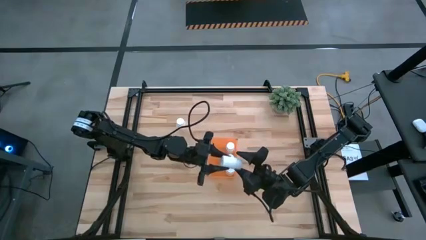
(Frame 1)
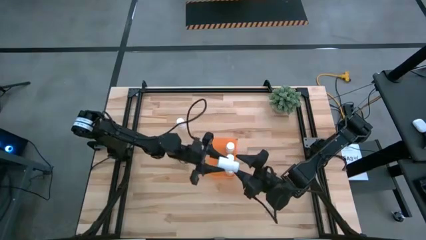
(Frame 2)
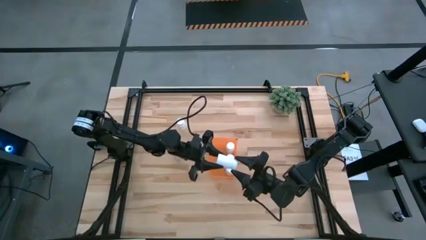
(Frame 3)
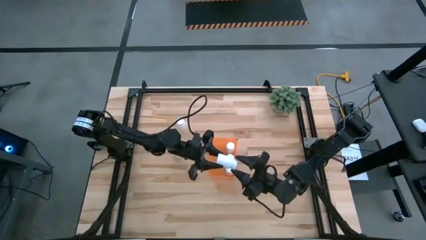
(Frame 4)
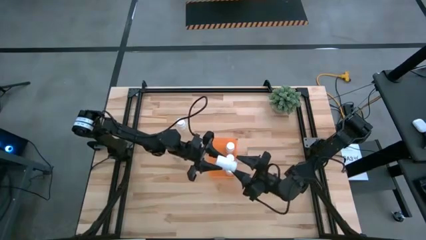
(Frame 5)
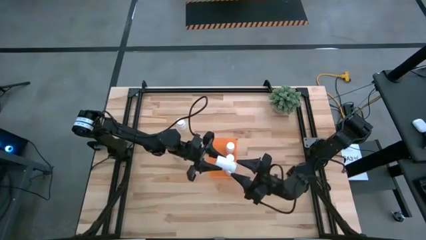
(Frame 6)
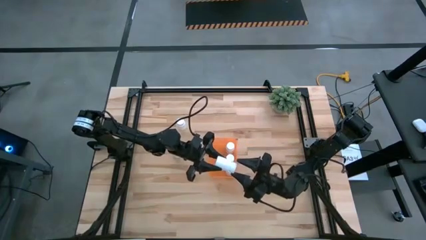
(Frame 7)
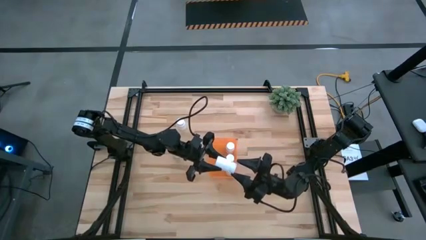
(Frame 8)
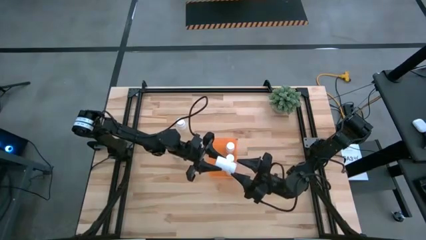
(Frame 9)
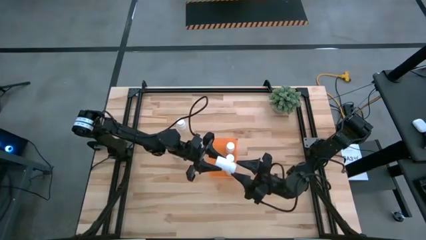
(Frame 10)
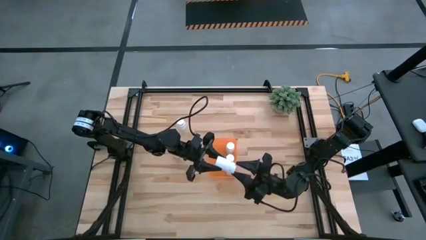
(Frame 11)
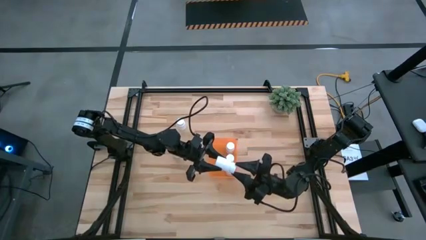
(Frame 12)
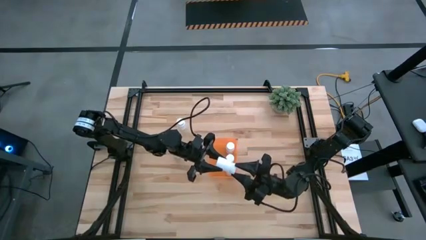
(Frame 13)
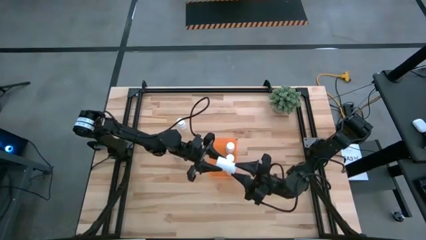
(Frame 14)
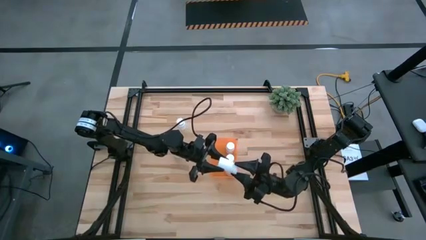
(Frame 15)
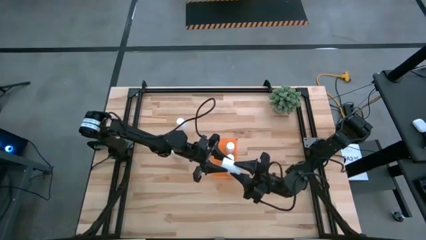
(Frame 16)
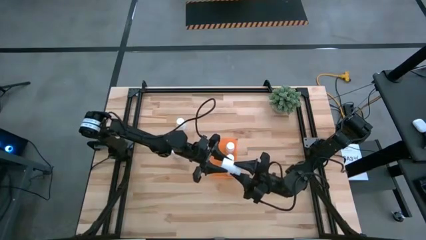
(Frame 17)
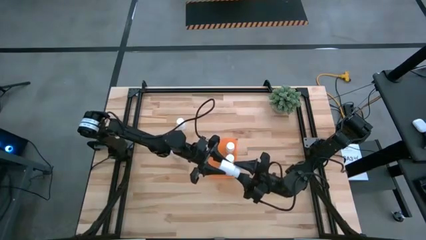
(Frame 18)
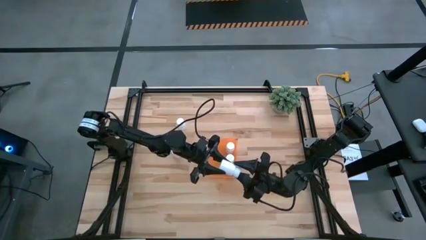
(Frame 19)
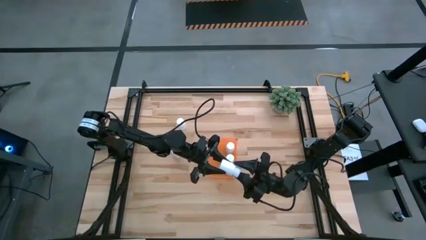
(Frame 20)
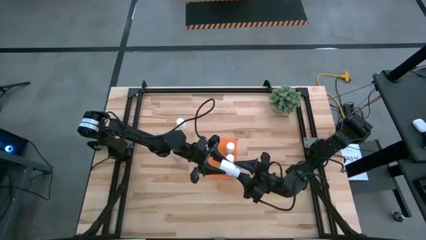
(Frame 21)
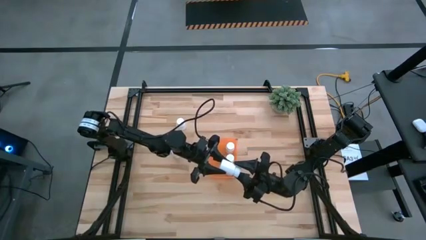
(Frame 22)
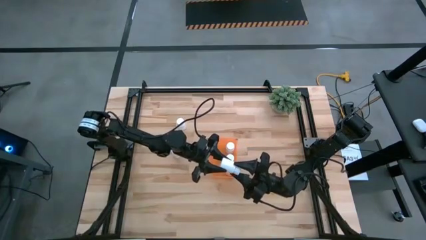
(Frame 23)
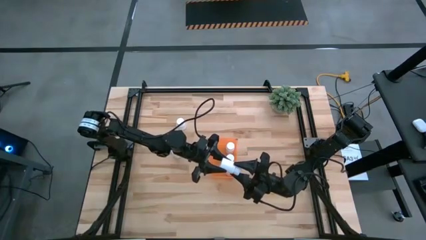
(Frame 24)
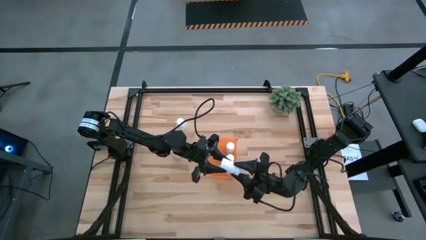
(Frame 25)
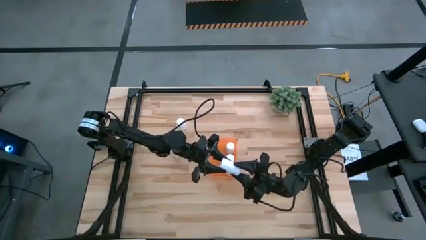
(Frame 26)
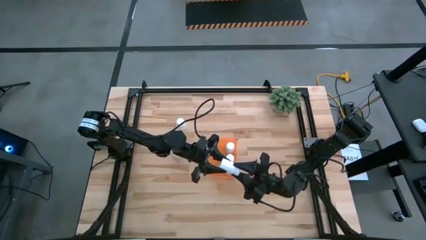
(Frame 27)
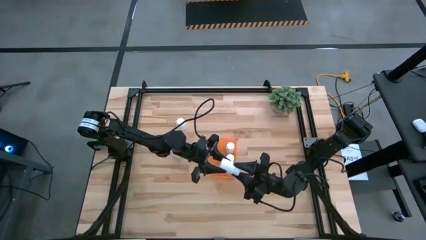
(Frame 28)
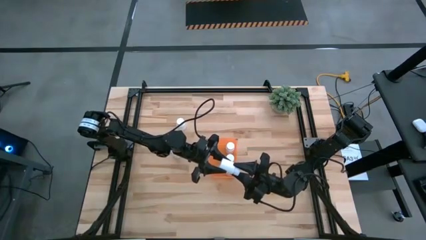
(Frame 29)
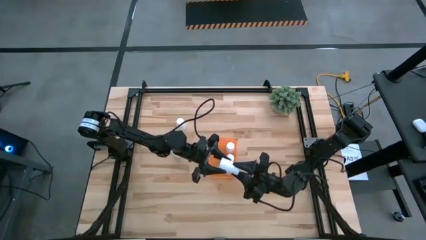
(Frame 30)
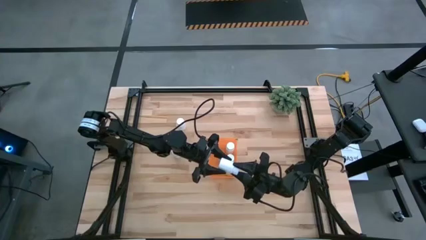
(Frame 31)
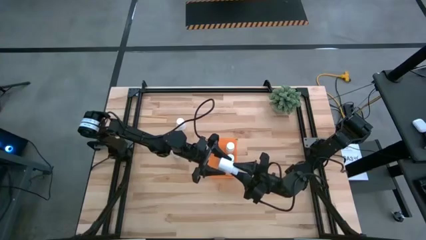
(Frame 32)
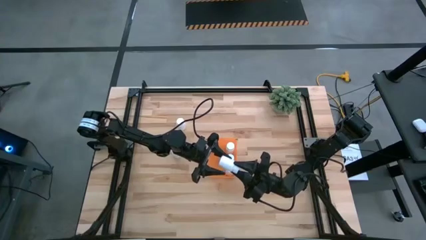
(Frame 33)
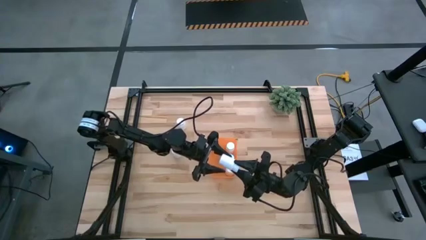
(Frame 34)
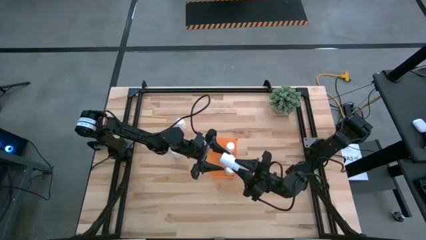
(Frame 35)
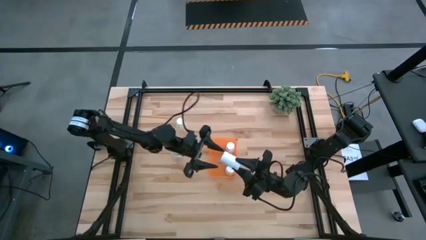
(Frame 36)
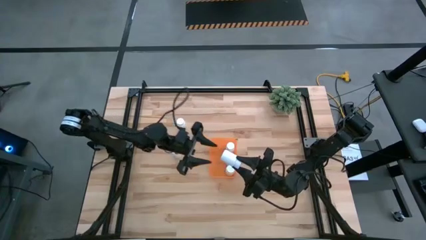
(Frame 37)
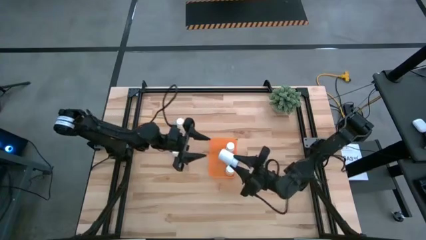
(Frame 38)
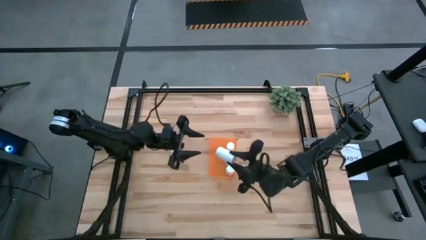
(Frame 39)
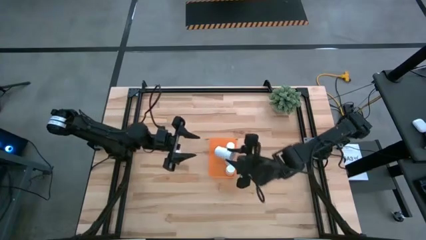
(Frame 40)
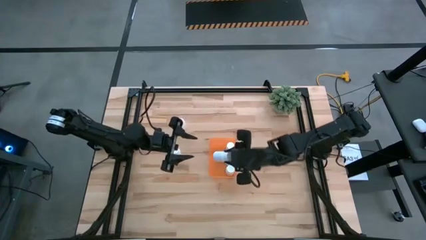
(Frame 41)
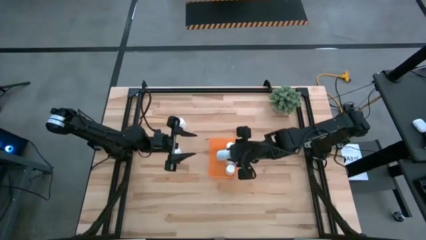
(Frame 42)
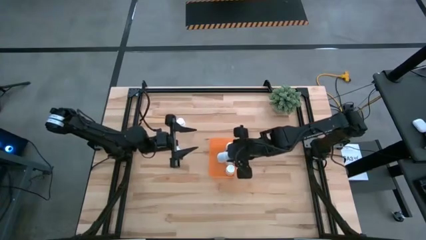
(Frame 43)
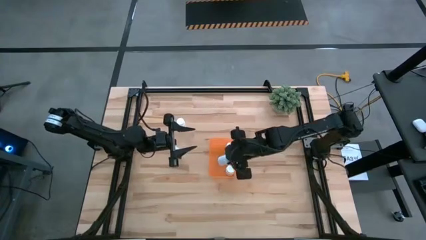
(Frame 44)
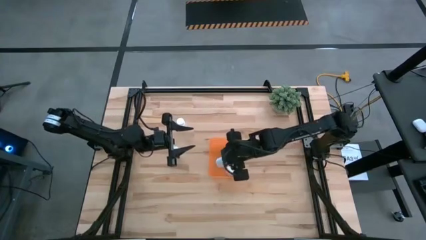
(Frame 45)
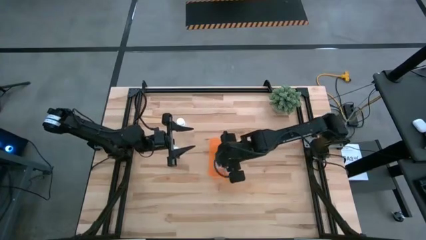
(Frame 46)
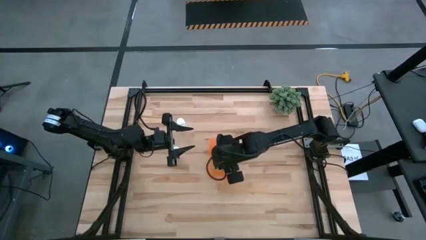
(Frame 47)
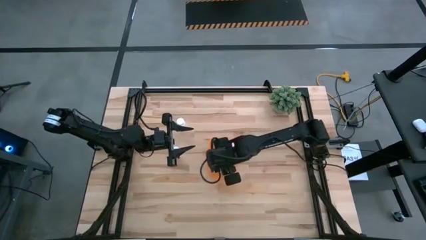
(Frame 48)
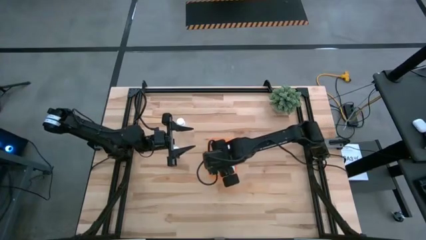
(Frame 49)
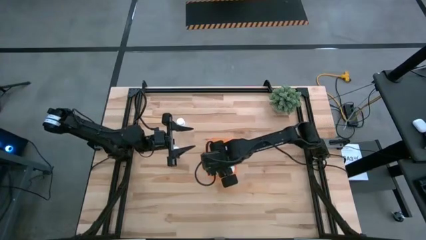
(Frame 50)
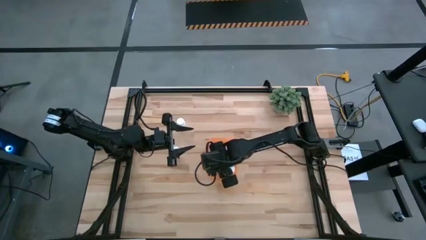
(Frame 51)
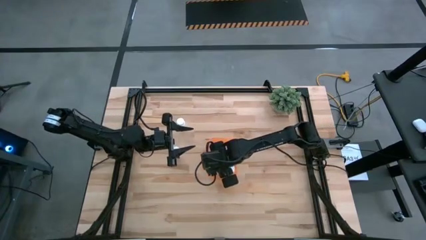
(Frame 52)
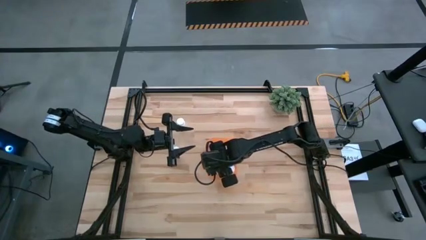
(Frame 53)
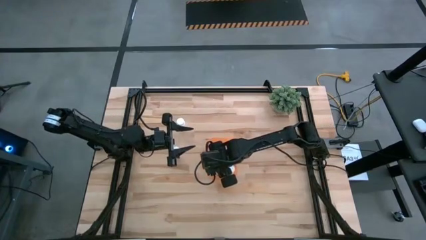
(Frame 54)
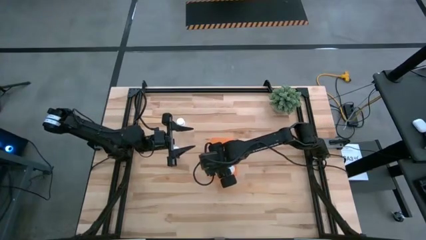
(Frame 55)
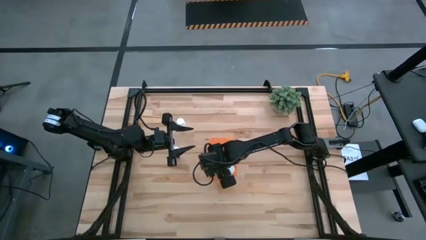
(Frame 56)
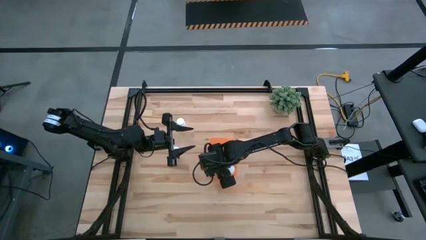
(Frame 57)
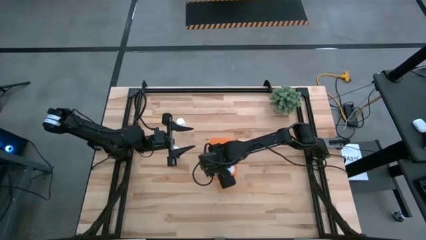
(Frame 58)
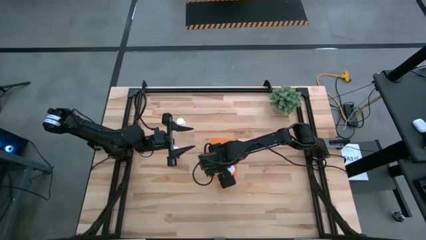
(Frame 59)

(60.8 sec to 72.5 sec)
Task: Pick and place pill bottles into a basket
Put the white pill bottle into the orange bin
